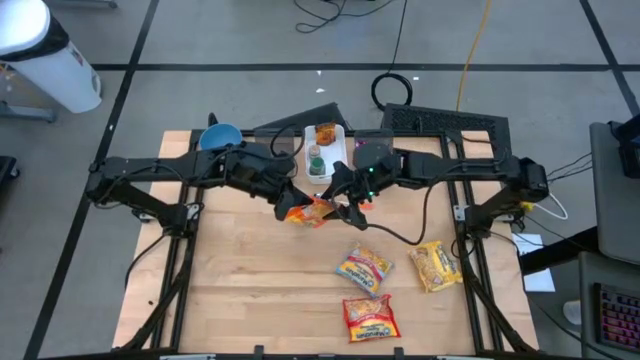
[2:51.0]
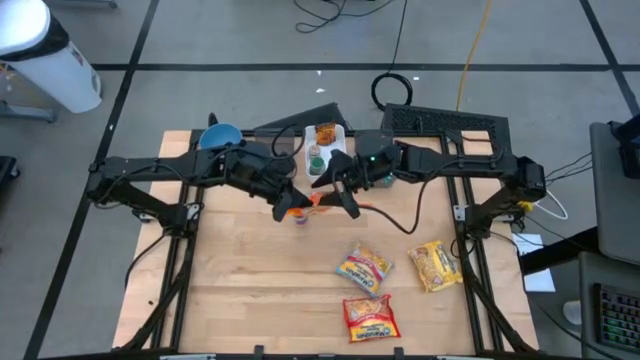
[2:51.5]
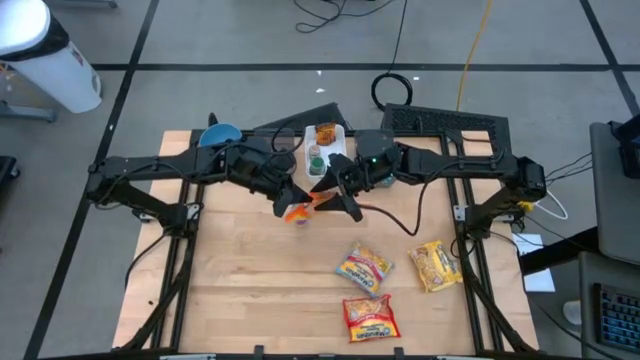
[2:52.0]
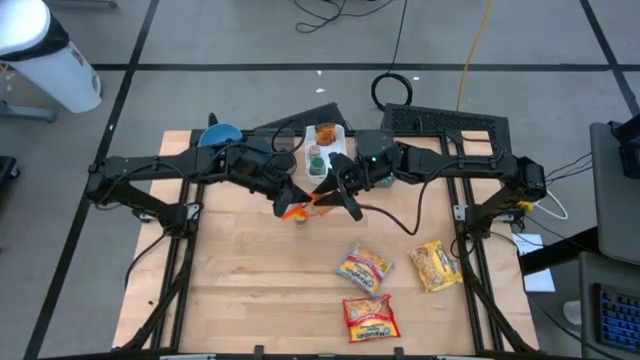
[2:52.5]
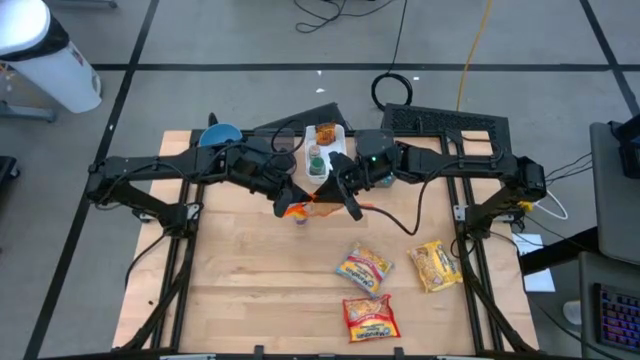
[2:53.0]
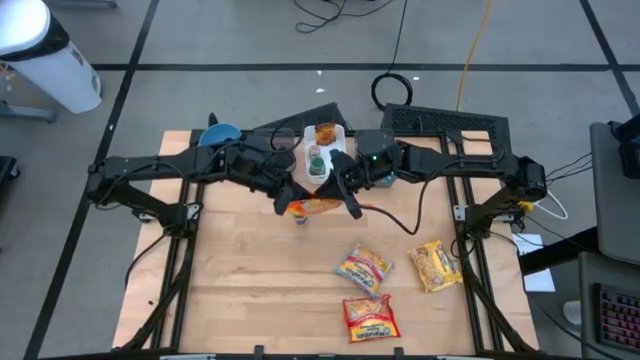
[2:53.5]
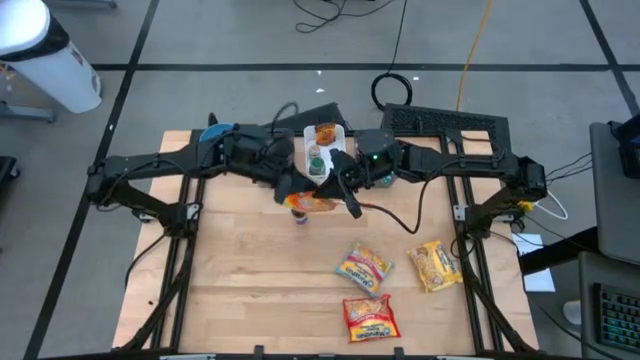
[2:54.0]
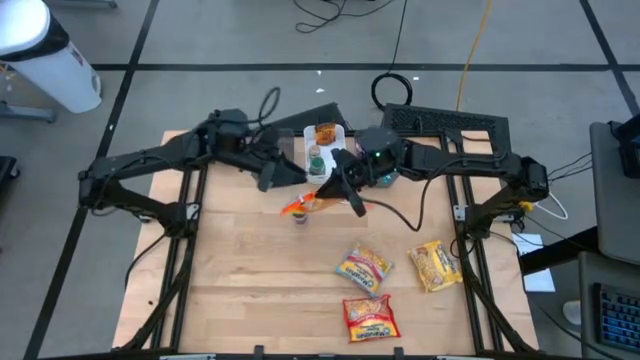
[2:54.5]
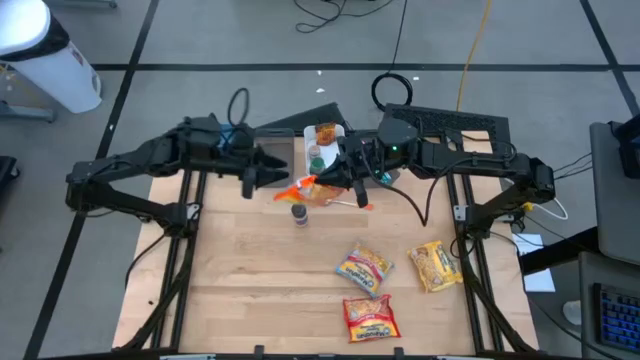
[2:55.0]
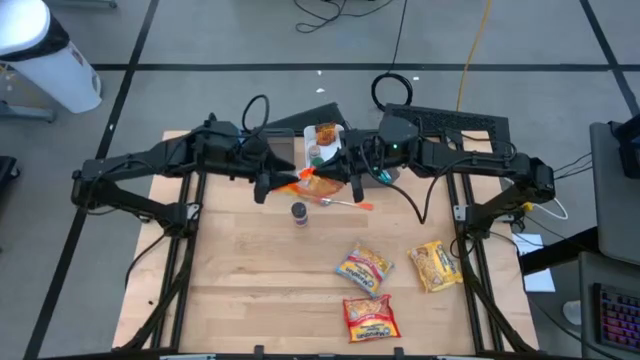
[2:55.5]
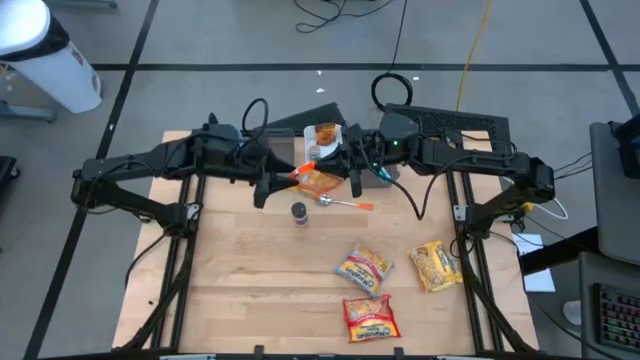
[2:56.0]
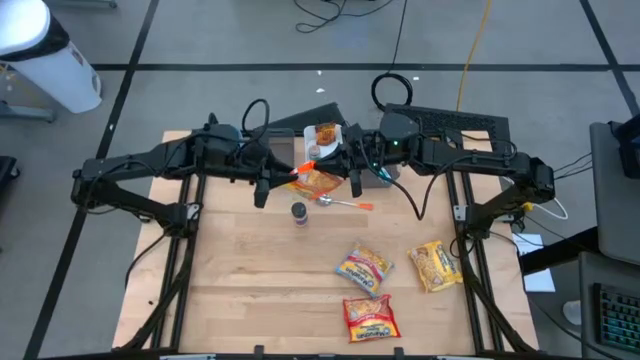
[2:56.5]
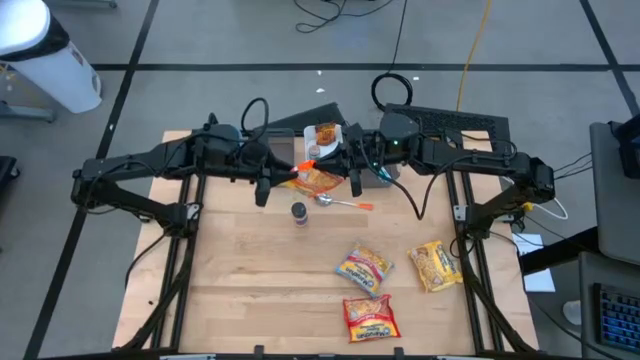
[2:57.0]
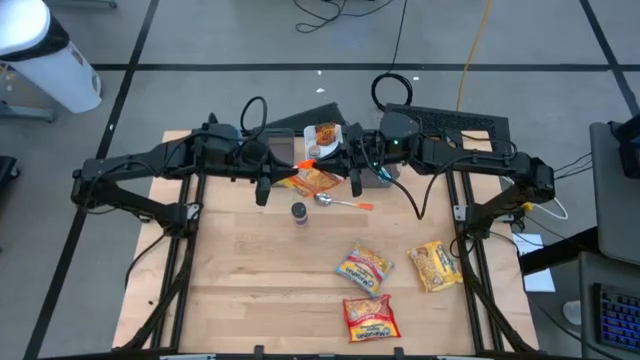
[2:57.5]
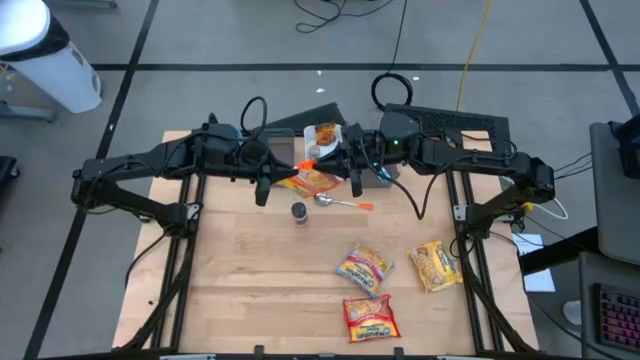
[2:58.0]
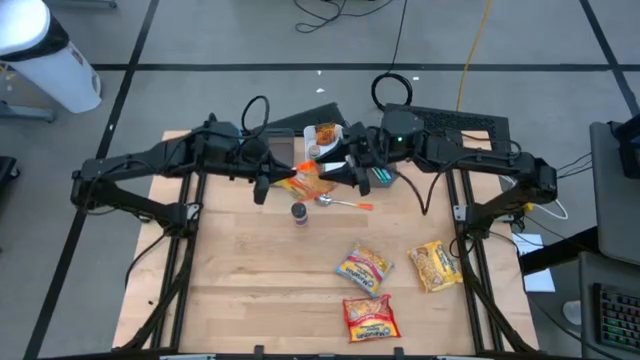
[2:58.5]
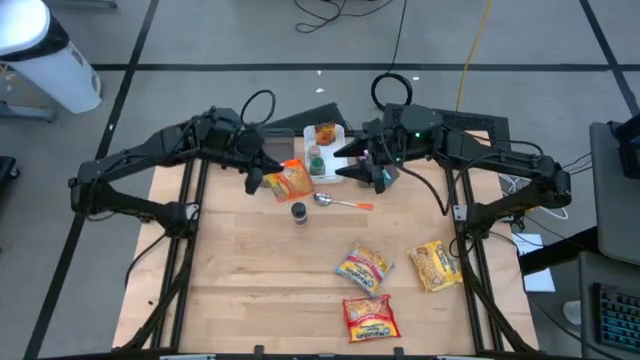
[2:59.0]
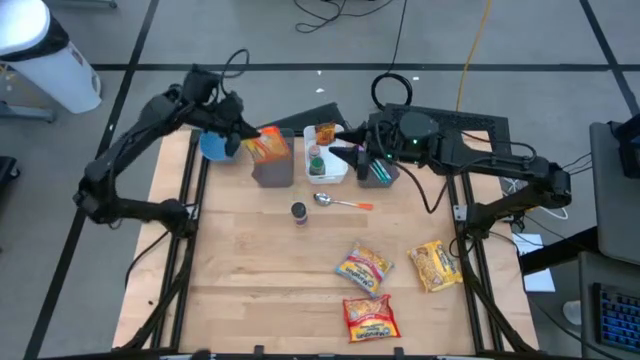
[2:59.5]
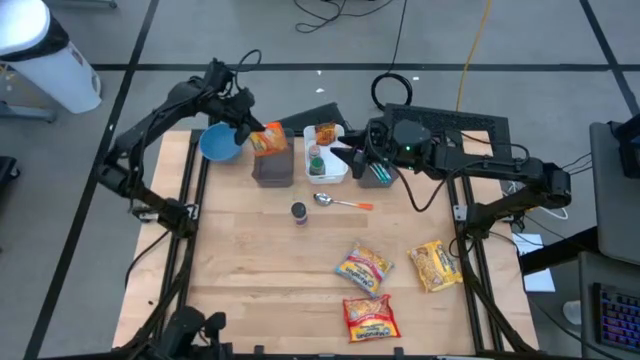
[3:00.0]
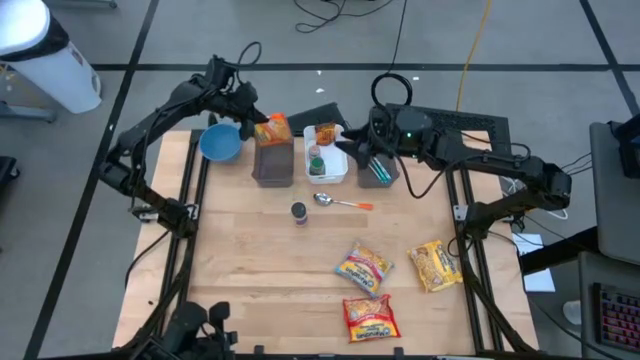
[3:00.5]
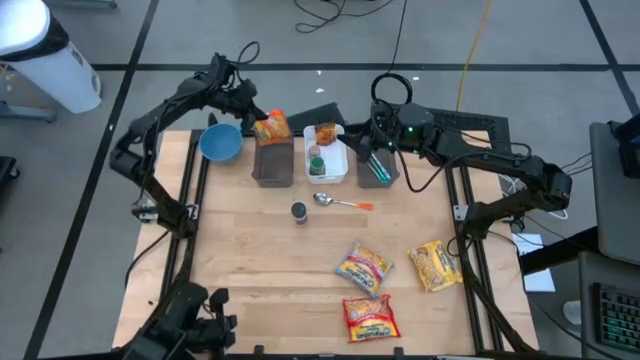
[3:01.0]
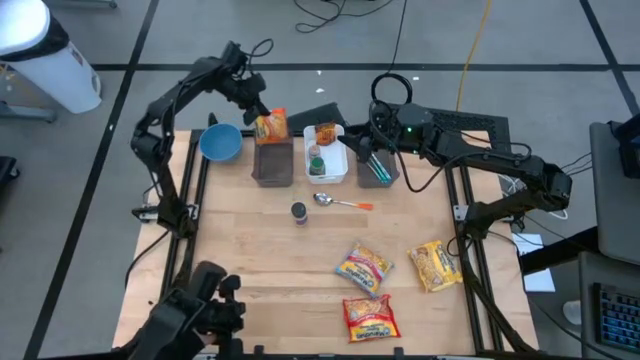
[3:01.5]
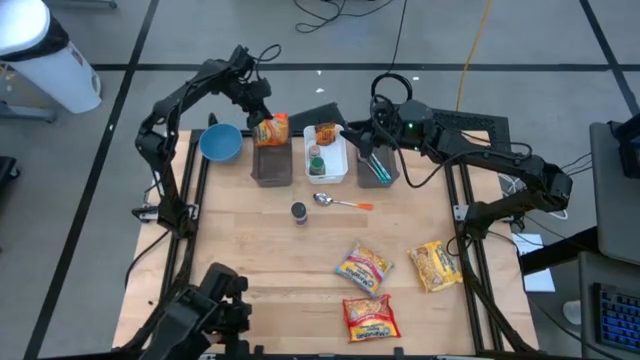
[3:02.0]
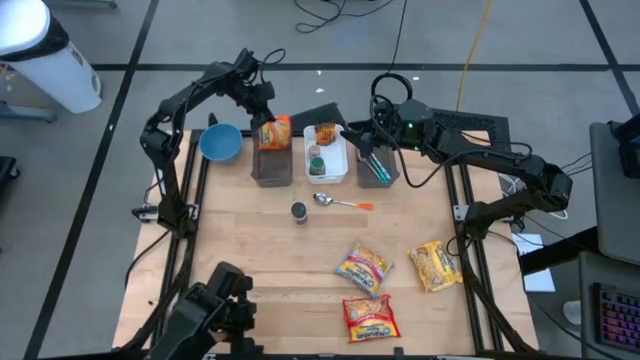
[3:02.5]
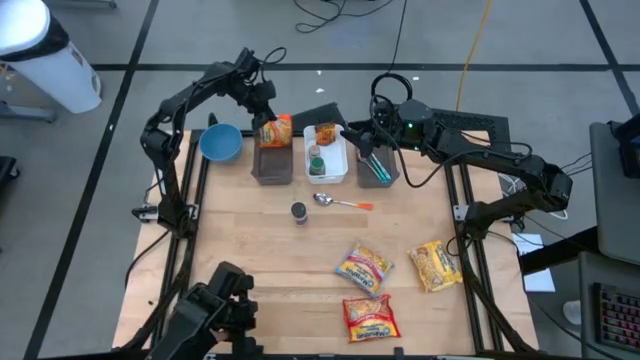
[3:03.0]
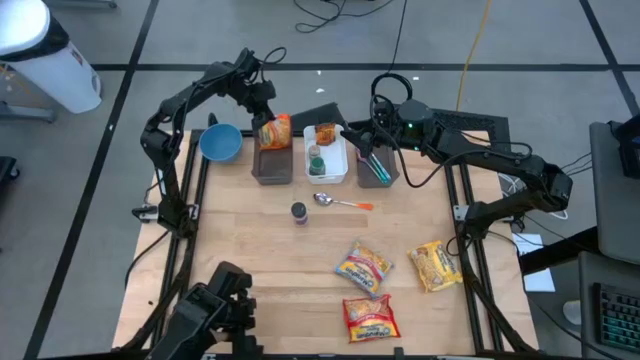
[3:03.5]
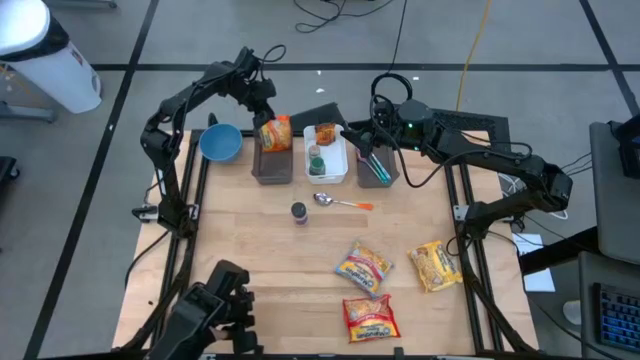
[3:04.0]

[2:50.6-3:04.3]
Task: Pick & Place Food Item
Put the orange noodle pack into the left black bin

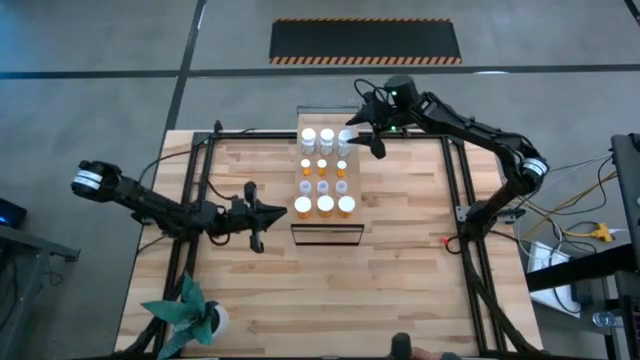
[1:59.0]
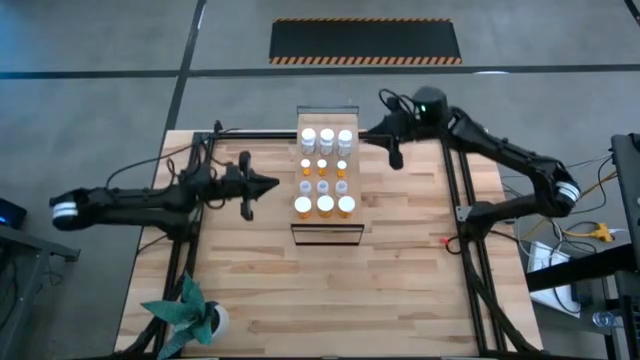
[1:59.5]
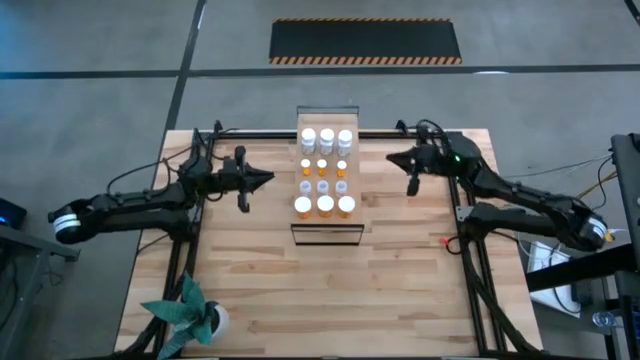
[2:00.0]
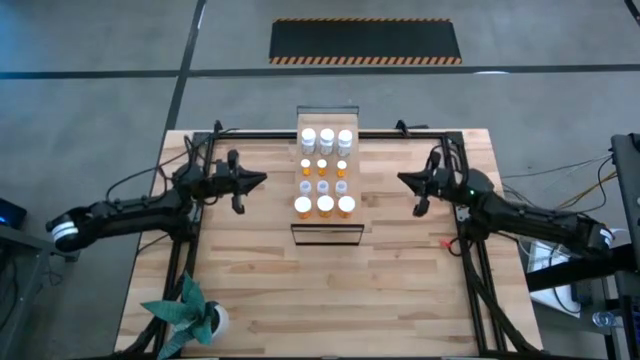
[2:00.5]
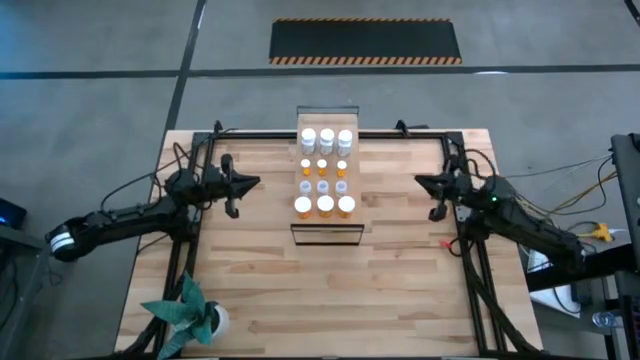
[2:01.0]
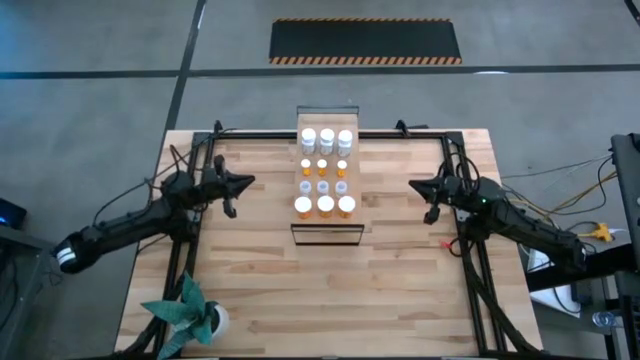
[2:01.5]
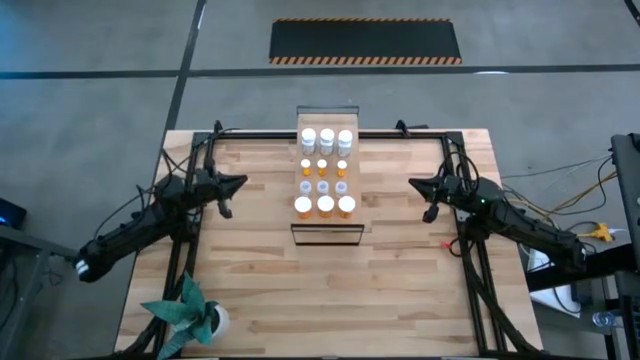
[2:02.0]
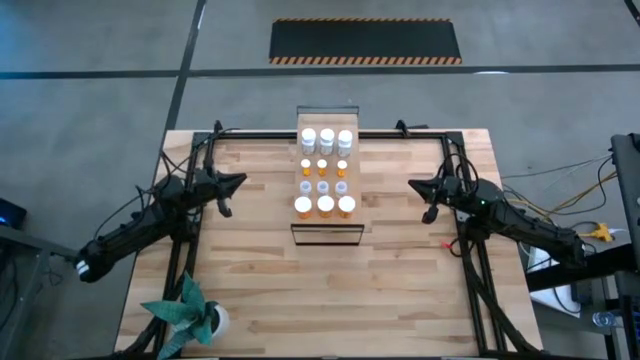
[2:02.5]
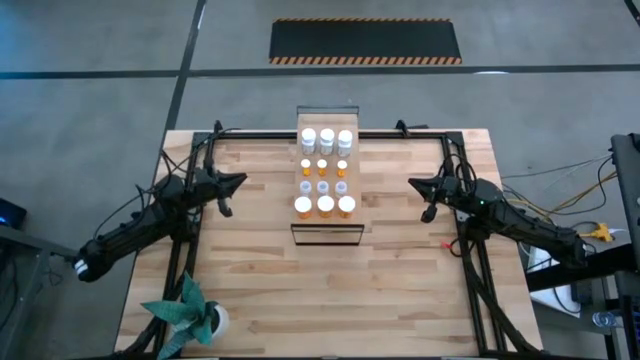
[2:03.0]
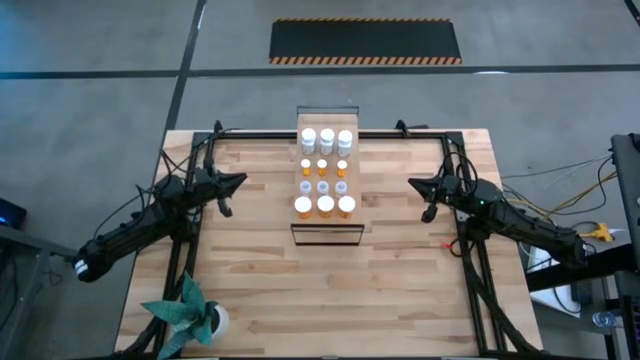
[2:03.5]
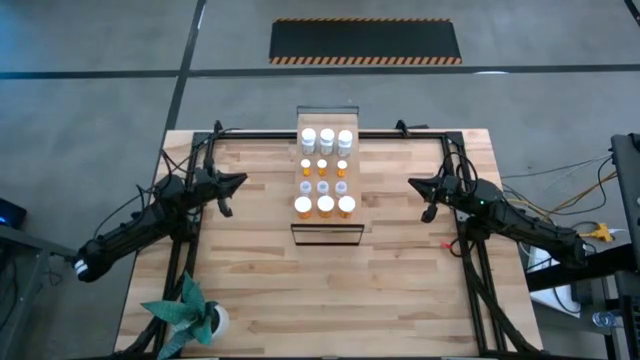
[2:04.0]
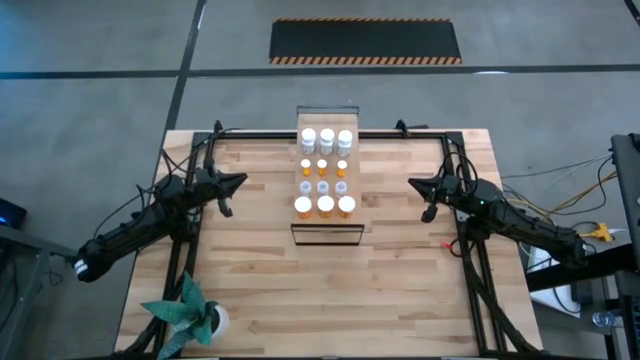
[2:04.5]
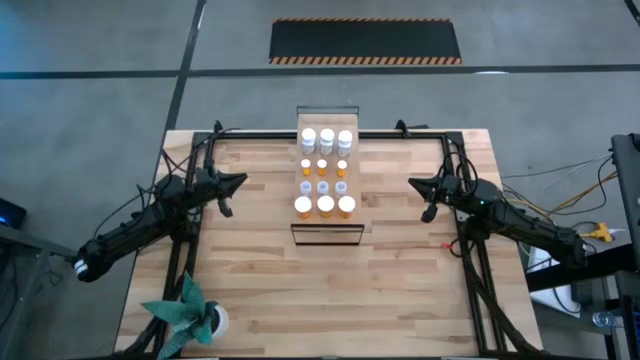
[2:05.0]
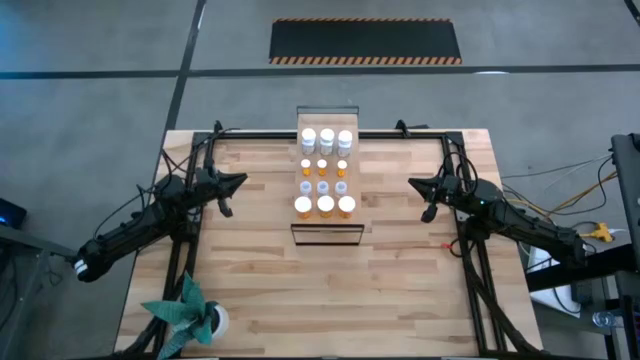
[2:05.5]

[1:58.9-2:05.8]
Task: Pick and place medicine bottles onto shelf by color
Return to Home Position
